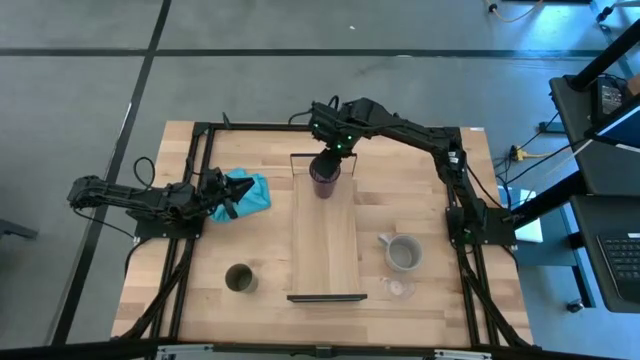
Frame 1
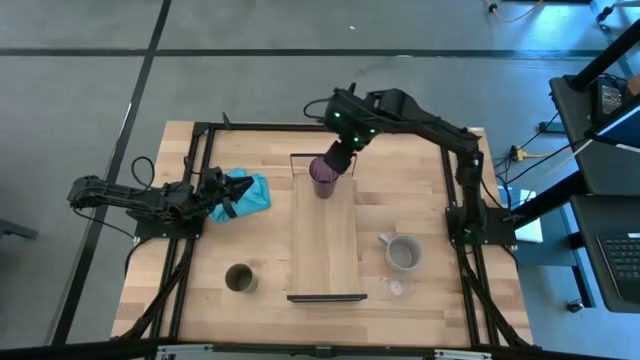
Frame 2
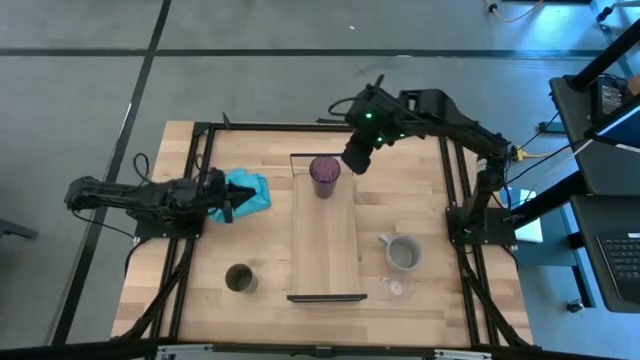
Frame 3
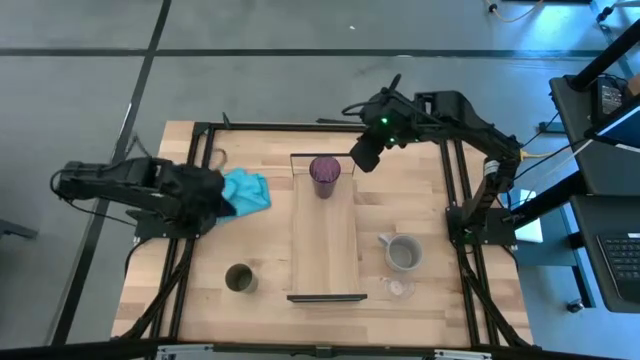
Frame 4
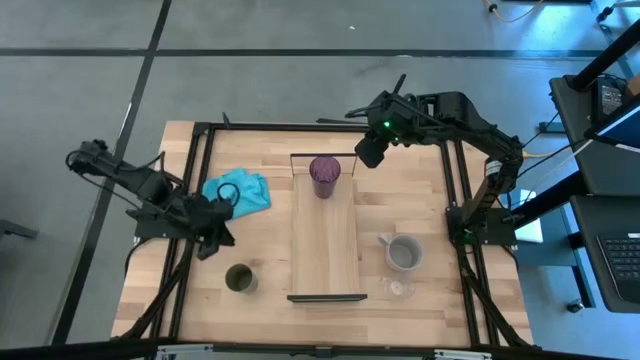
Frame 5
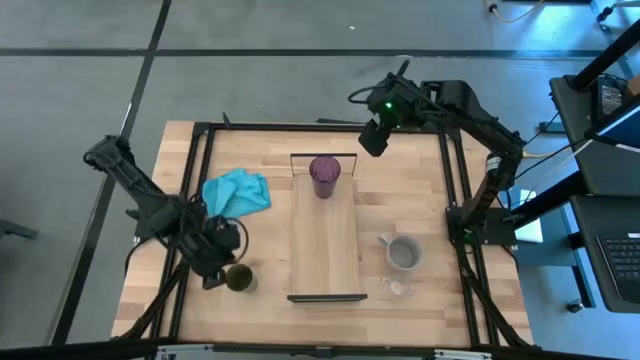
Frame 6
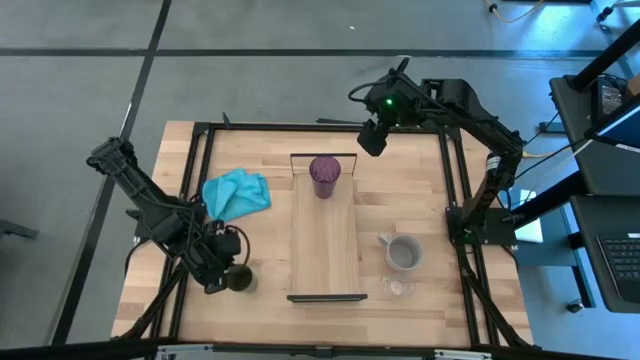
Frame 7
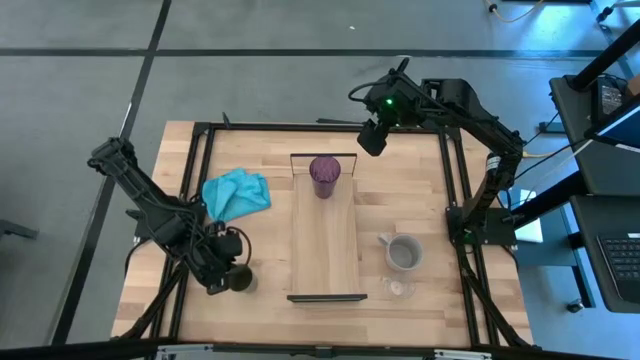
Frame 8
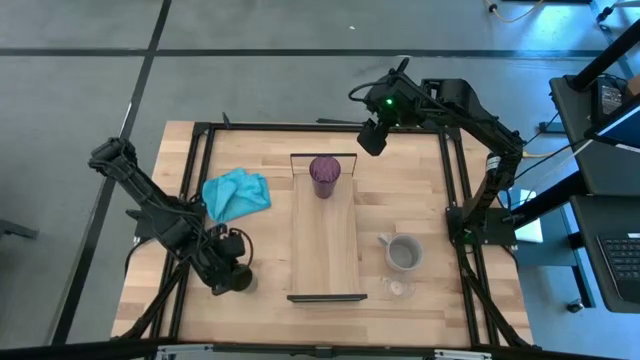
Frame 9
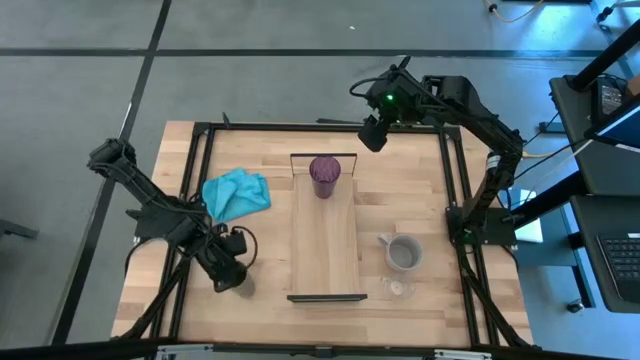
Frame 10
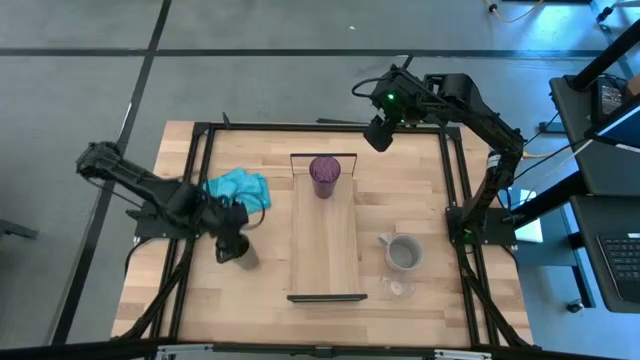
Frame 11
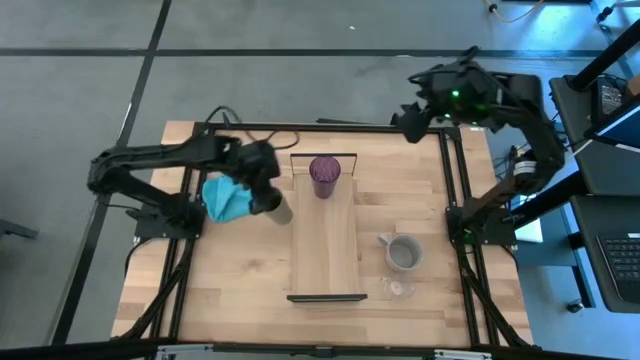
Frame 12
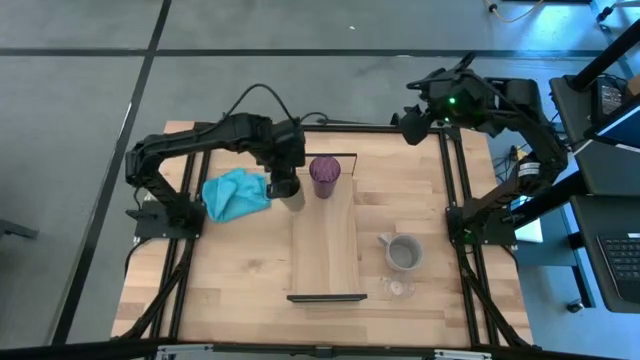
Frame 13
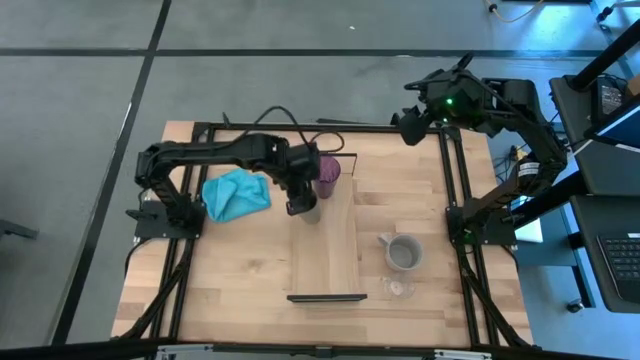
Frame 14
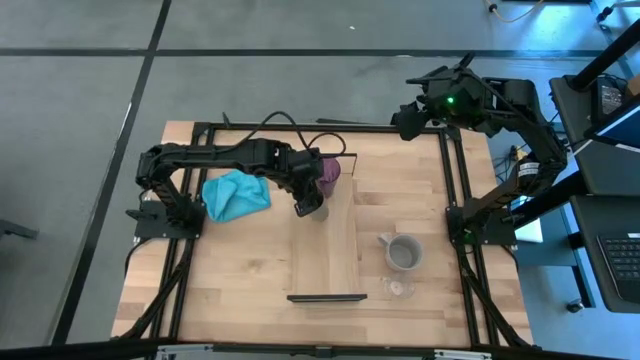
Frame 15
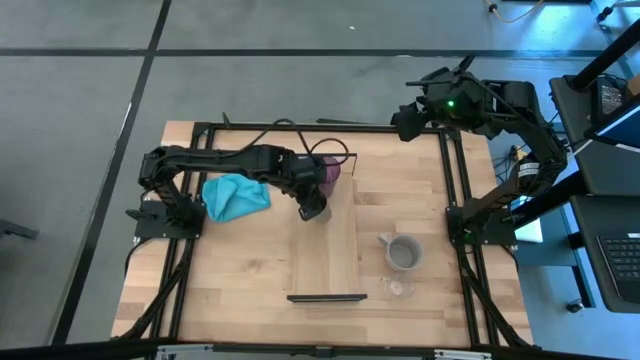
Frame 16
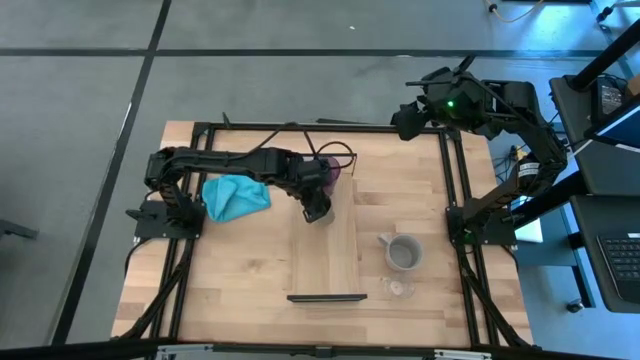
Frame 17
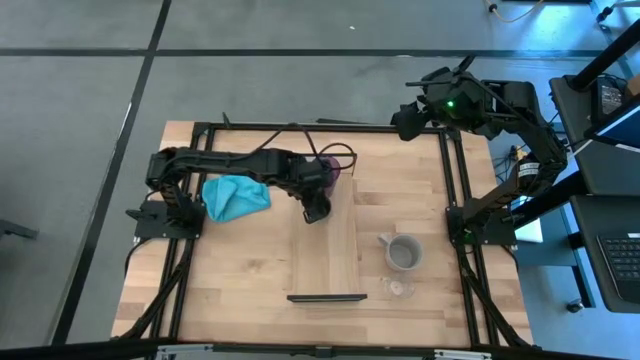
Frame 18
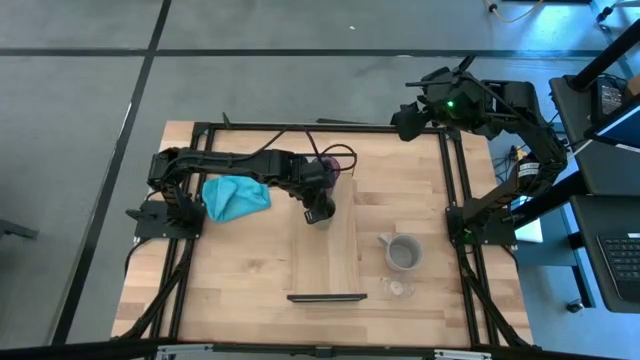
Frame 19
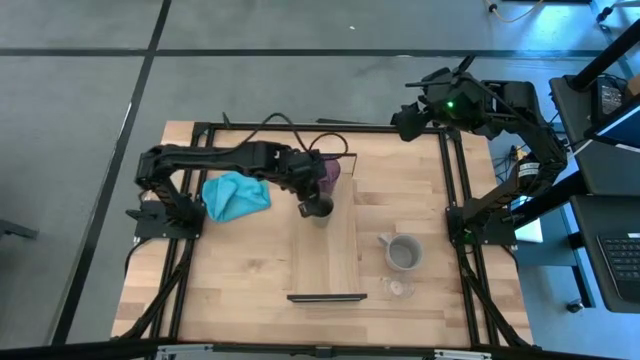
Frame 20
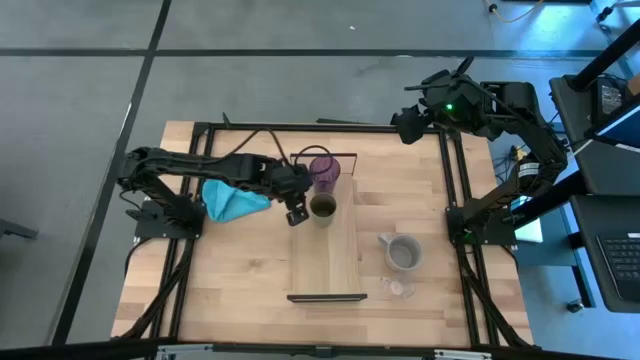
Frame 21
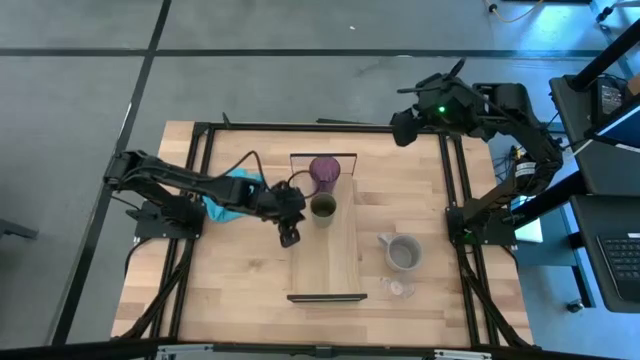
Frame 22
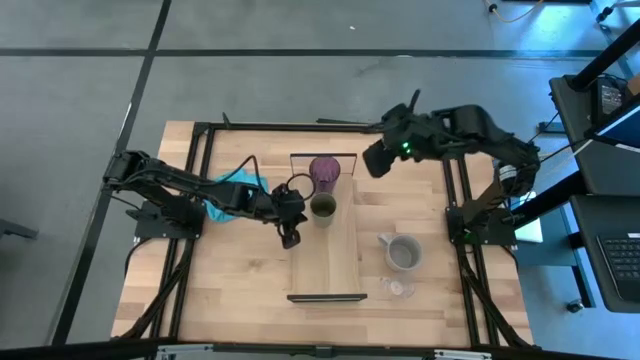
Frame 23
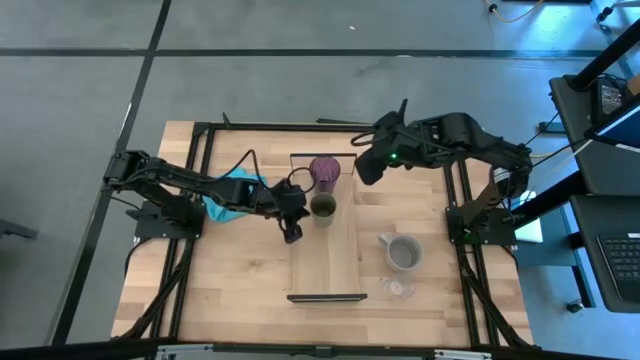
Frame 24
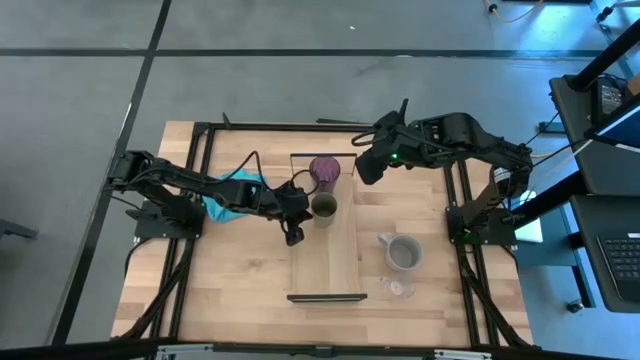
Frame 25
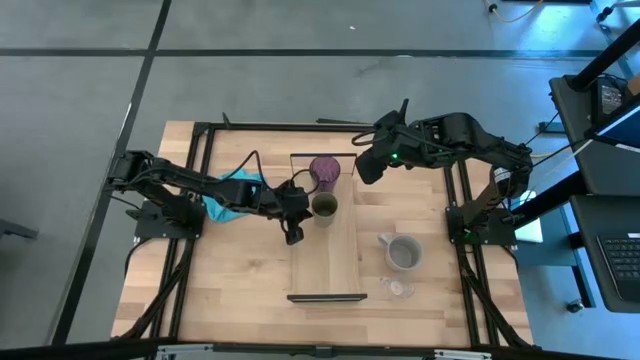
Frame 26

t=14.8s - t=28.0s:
Task: Stack small to large cups/mugs on shelf
Put the gray cup on the shelf

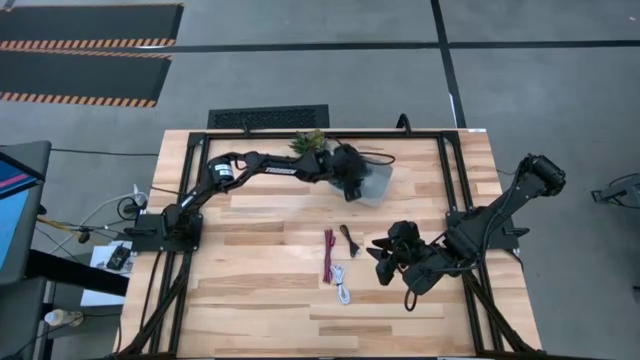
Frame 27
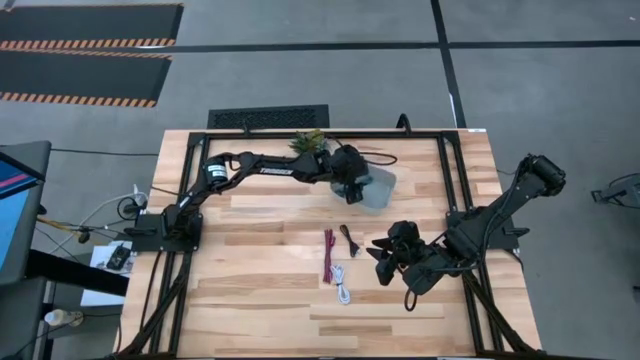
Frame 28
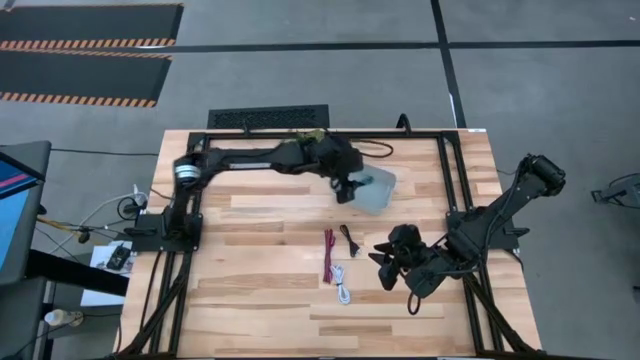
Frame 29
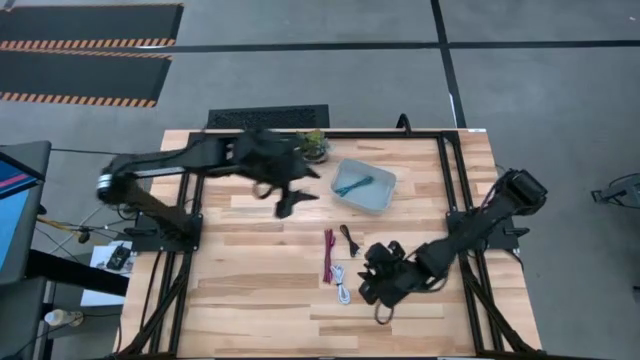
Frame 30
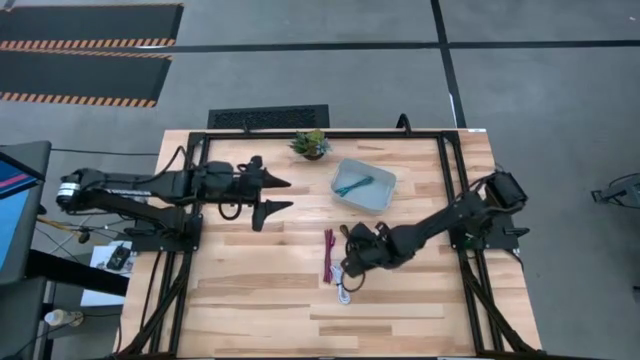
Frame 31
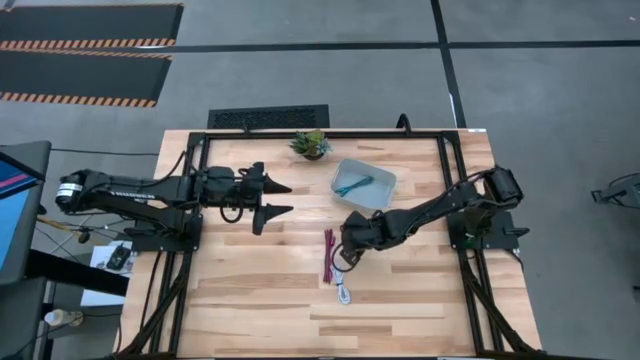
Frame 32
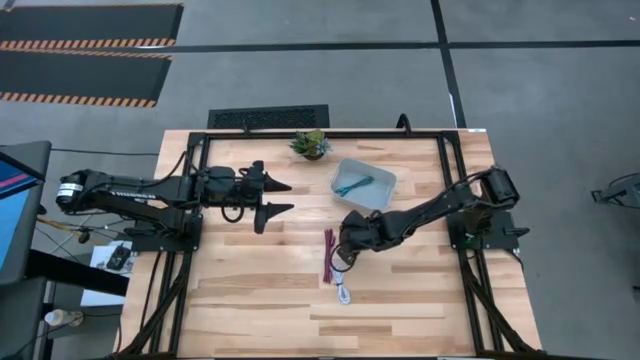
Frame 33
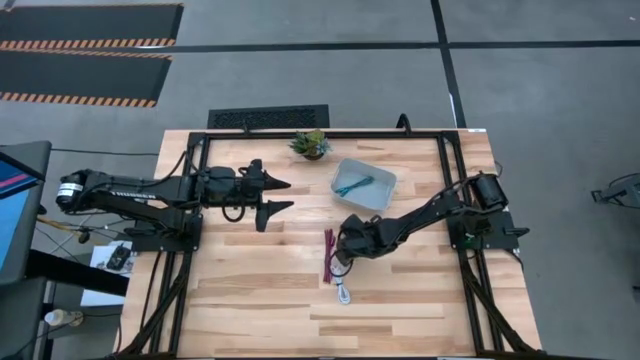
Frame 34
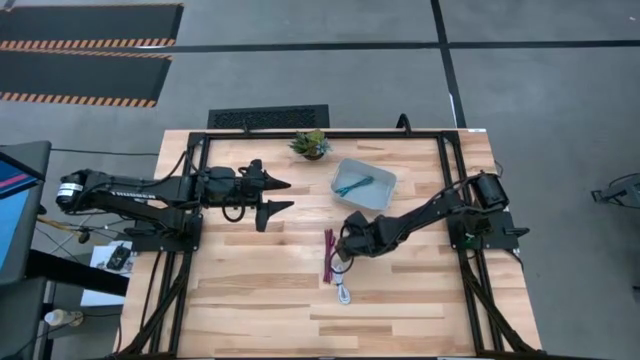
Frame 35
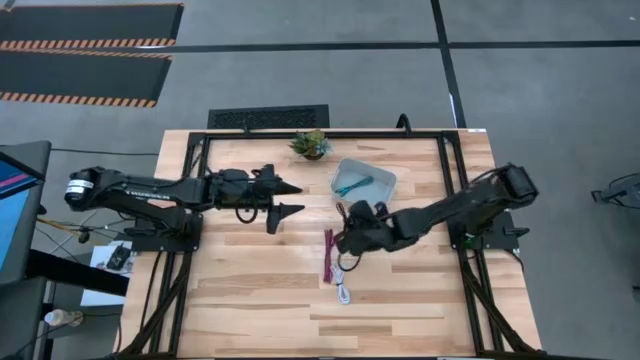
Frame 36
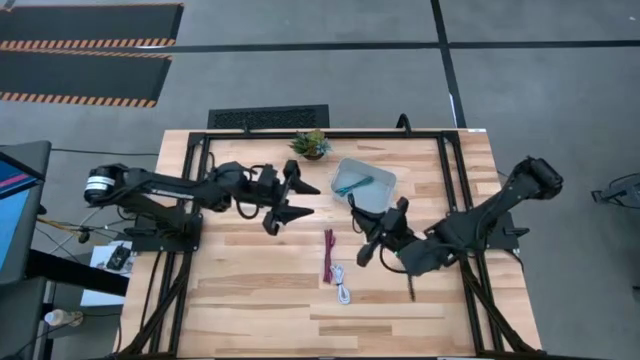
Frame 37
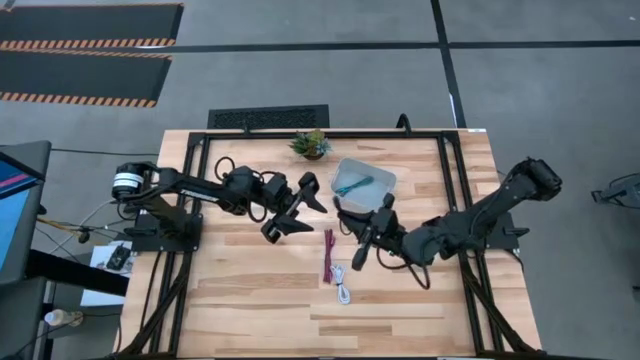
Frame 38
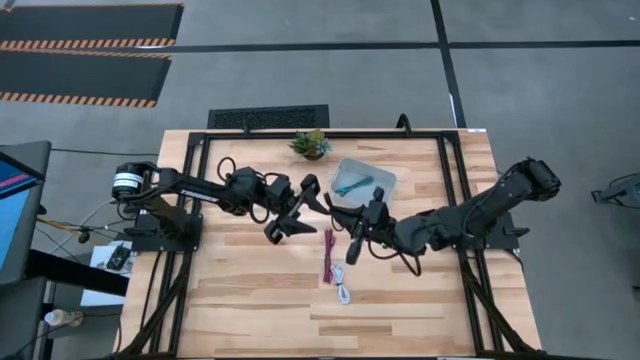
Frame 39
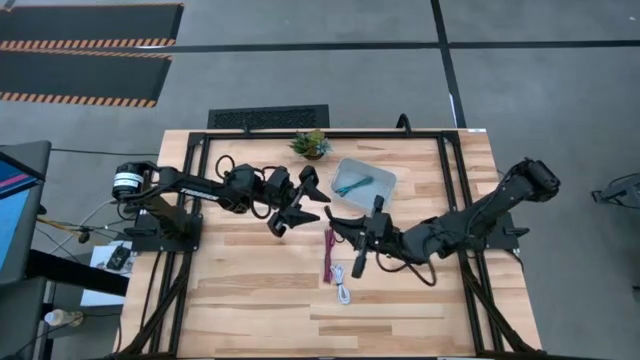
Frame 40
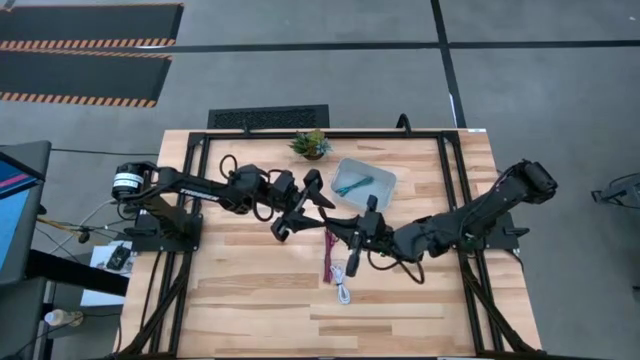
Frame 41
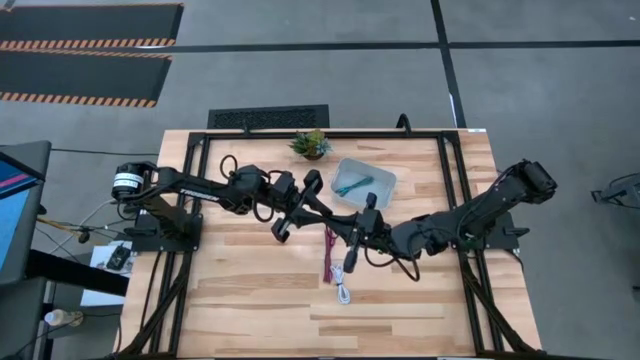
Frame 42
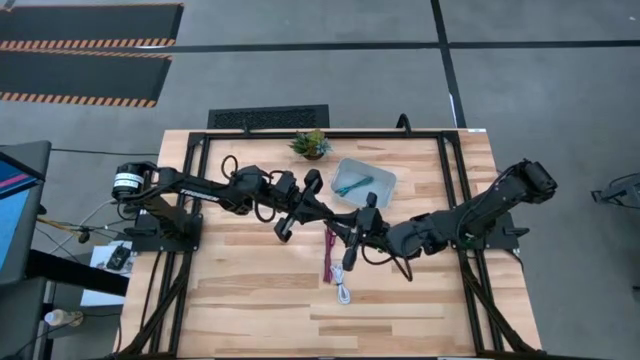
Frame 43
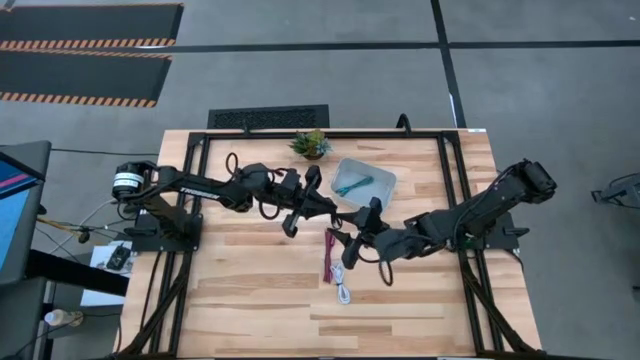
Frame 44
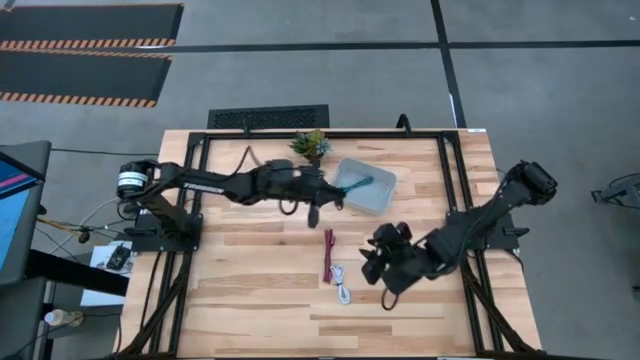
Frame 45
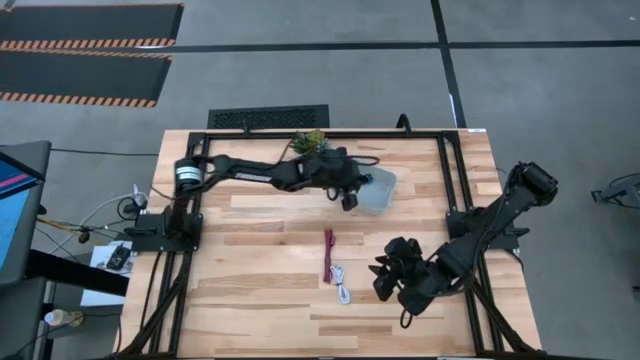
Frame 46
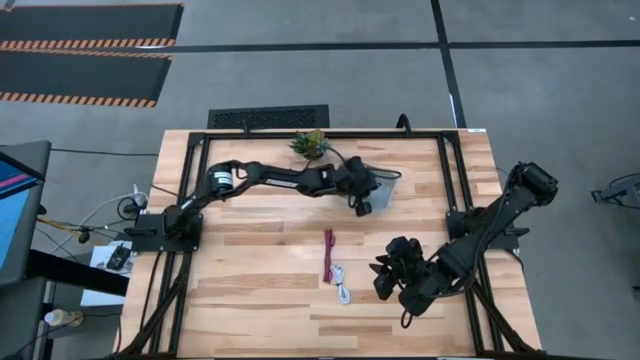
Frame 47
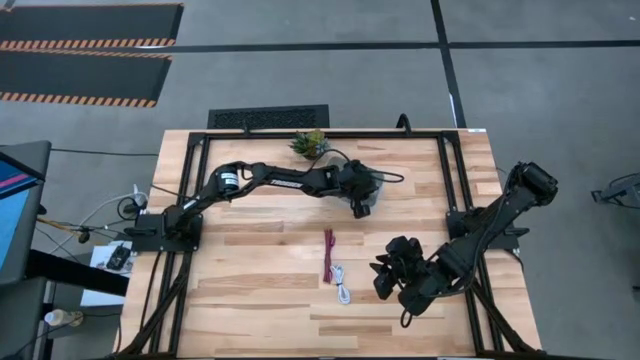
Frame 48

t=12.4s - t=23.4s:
Task: Pick and place USB-C Cables
Put the black charger cable into the white bin
